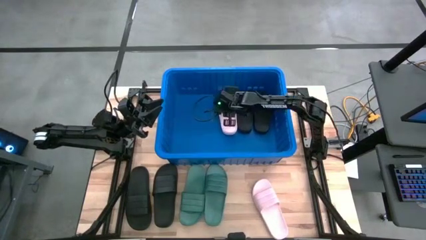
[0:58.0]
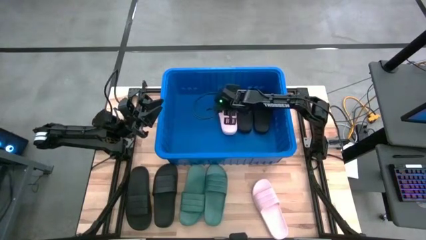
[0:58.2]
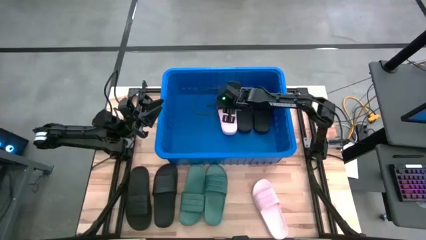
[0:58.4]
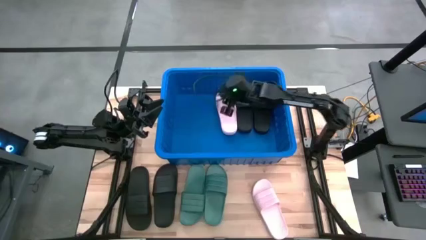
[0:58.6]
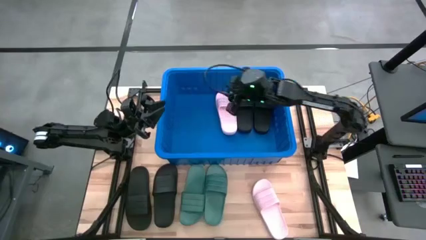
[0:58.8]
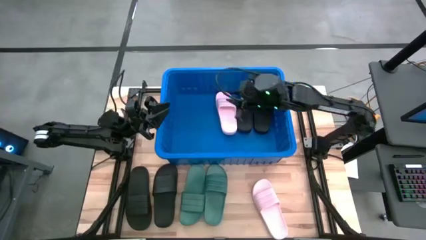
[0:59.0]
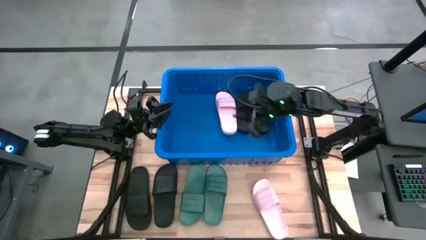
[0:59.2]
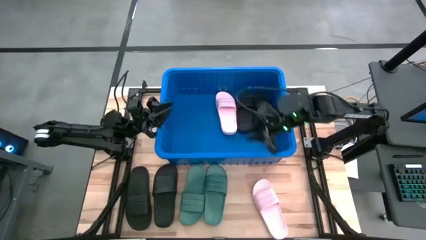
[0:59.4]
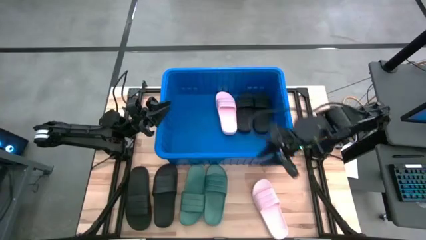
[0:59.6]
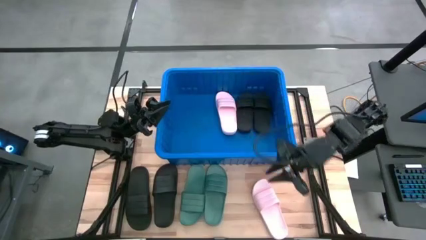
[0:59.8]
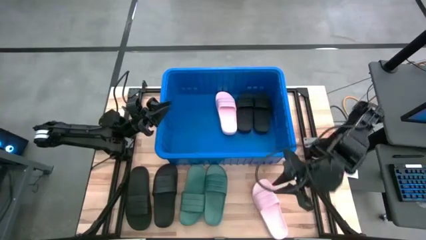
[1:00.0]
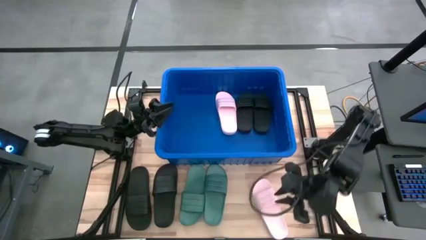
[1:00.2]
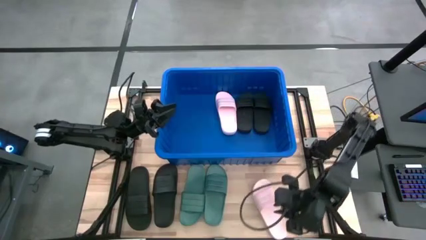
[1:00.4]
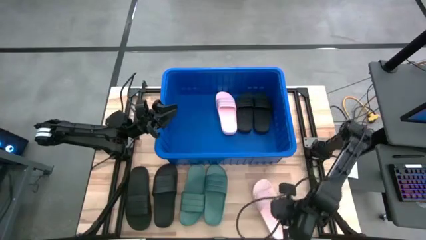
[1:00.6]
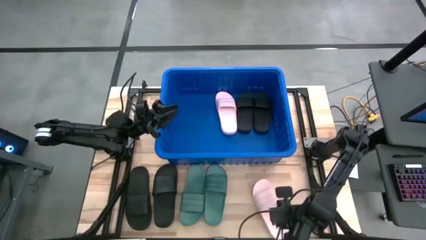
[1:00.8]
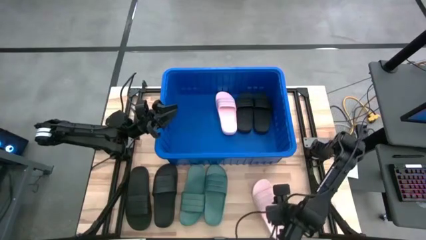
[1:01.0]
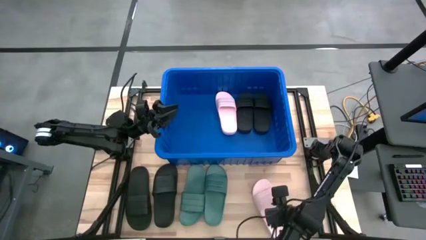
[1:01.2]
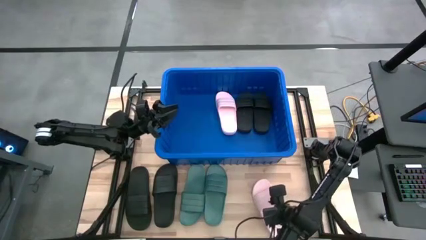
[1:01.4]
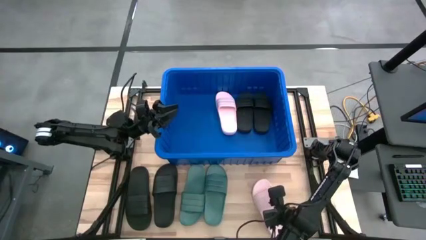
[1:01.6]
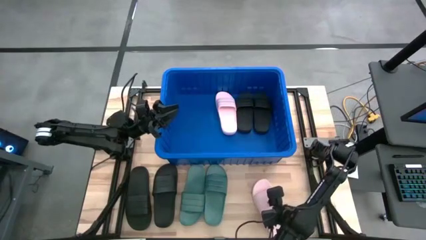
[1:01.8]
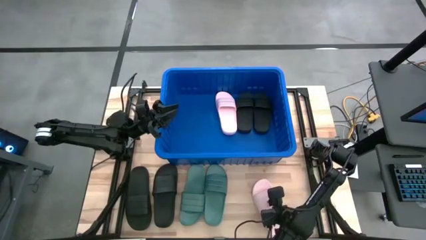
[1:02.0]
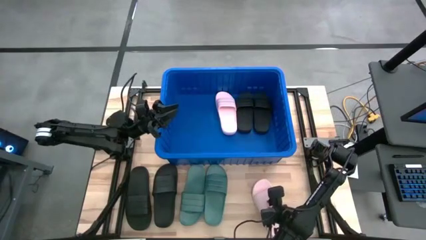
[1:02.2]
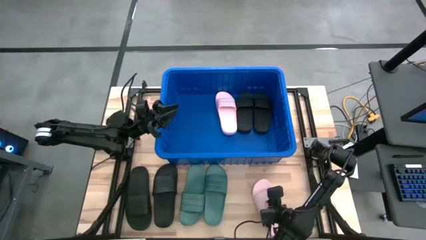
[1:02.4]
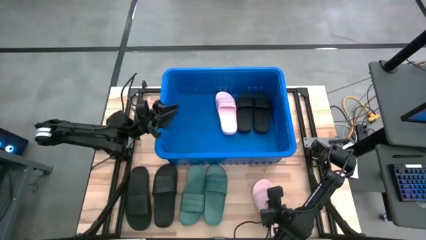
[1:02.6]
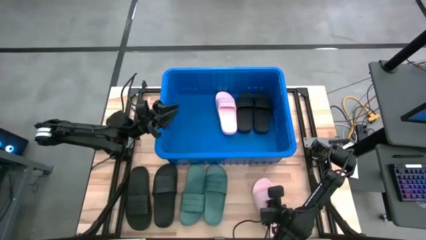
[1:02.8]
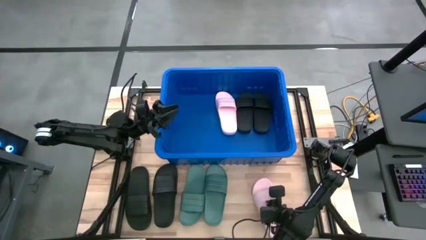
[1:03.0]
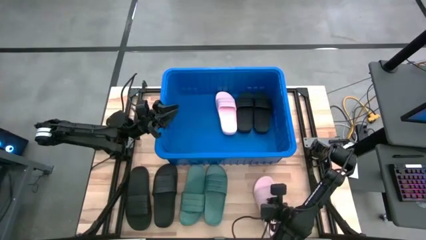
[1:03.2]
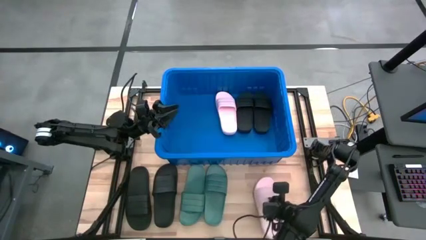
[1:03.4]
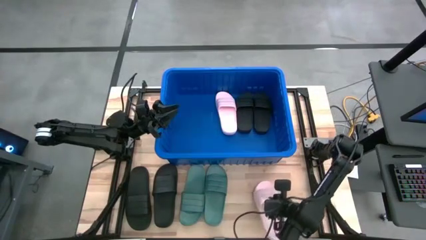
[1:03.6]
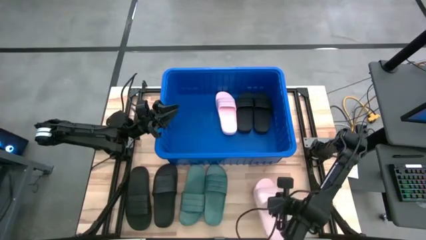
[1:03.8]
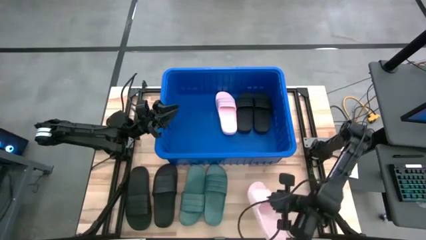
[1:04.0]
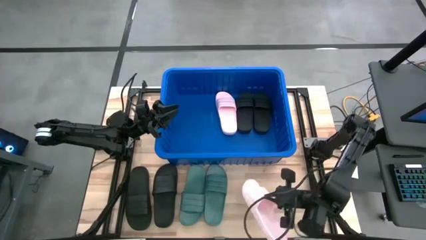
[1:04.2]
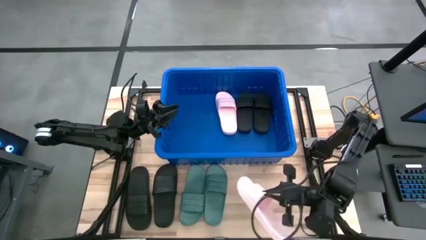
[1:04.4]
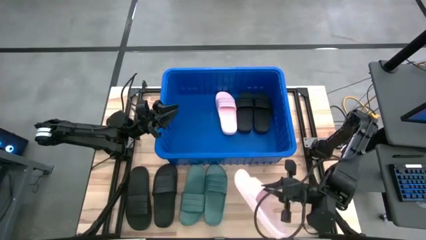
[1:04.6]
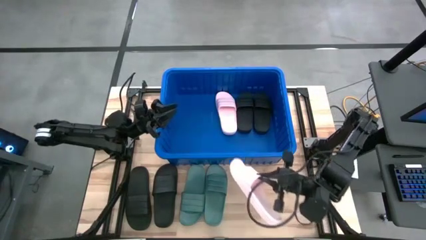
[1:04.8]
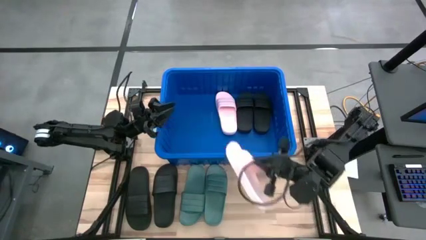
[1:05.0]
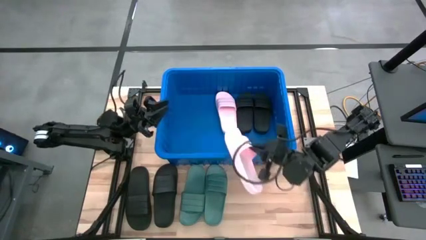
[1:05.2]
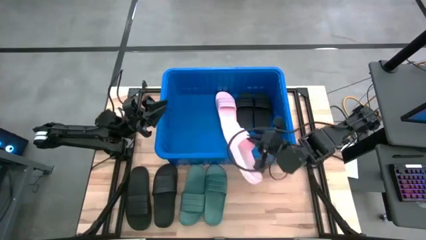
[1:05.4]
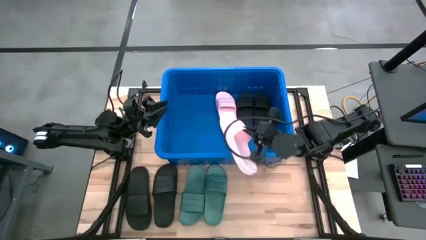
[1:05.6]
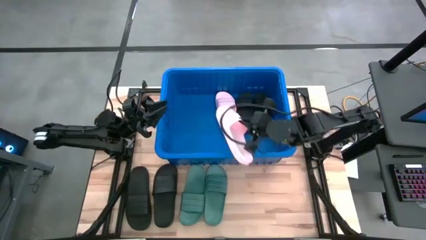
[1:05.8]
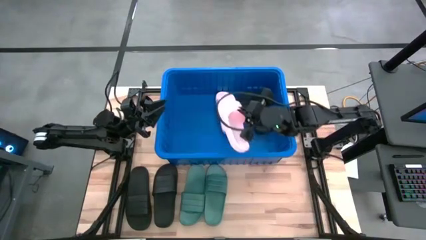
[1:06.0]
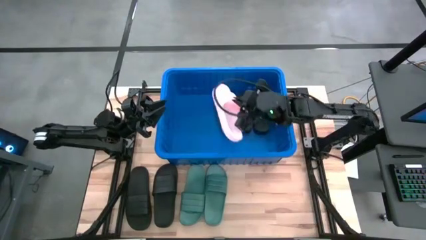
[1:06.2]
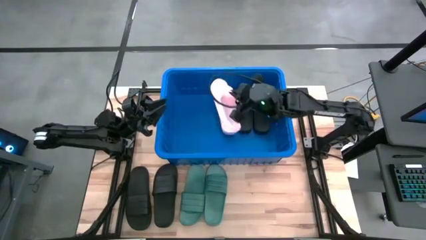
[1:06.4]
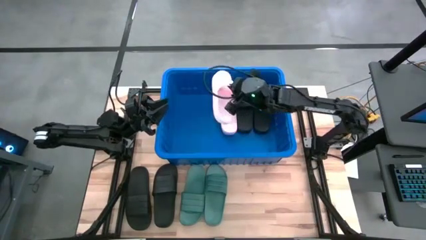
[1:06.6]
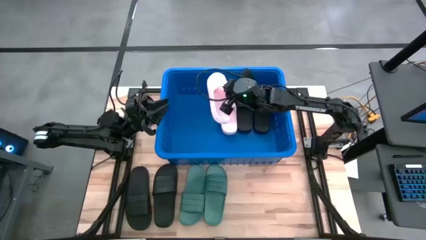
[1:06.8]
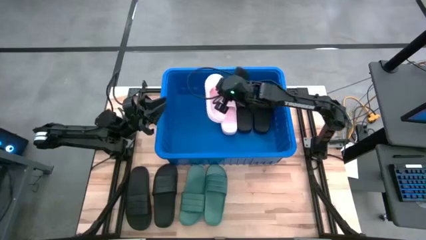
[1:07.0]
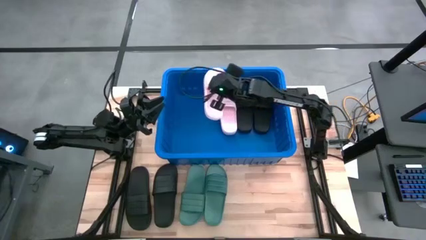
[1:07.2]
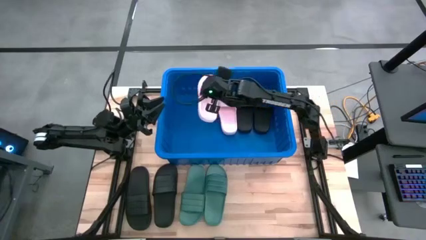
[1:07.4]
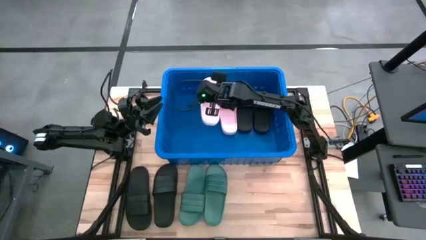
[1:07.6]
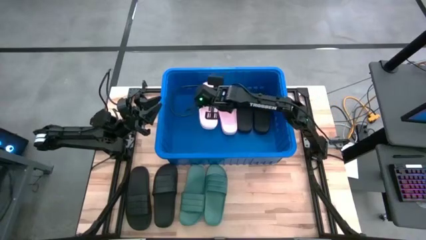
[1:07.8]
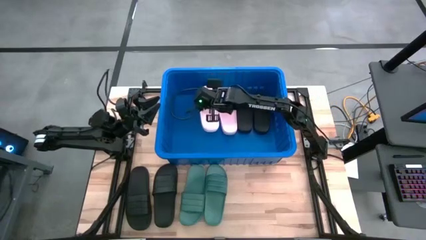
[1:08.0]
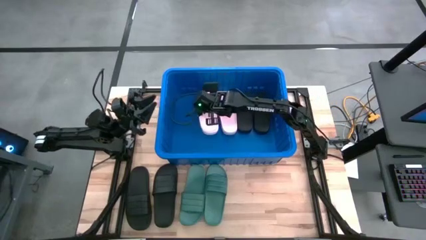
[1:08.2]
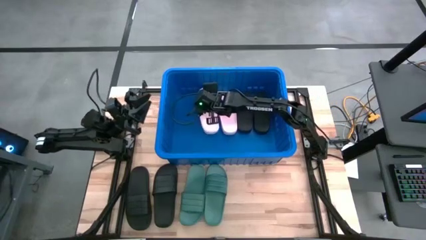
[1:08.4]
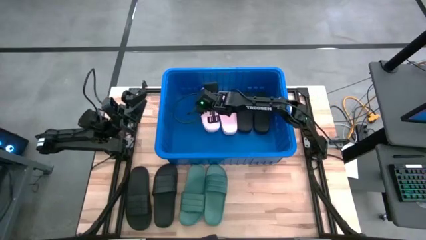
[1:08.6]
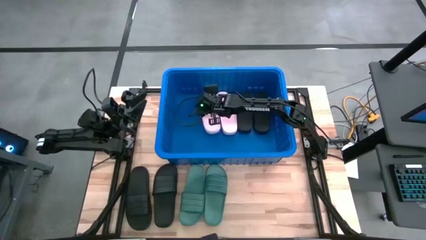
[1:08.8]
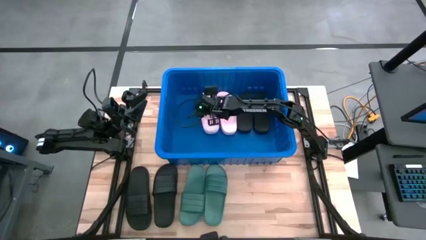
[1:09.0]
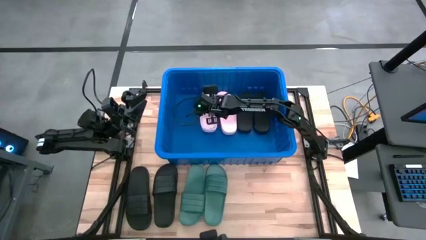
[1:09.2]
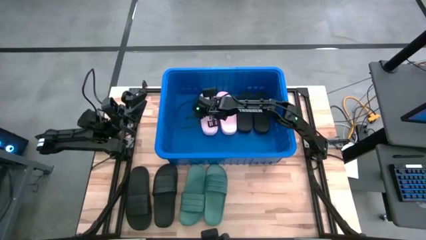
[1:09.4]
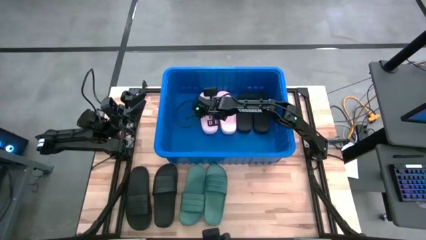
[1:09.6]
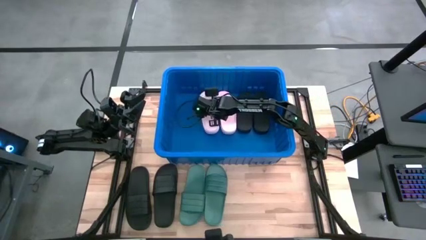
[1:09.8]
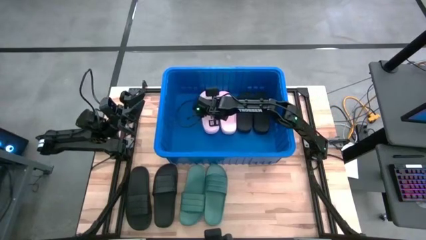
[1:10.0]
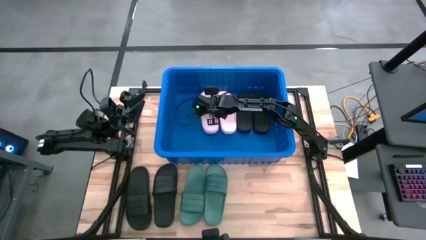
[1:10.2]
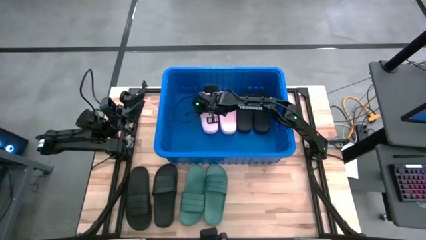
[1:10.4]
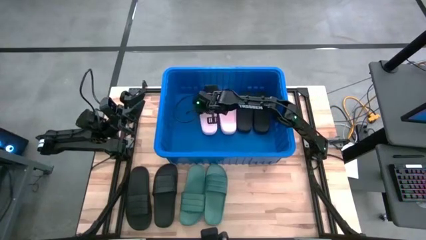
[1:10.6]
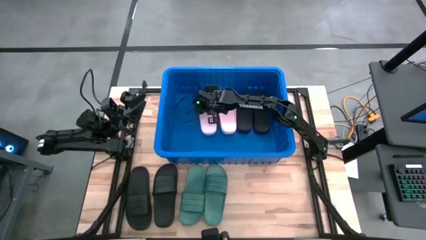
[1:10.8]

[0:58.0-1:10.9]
Task: Pick and place slides into bin
Put the pink slipper into the blue bin

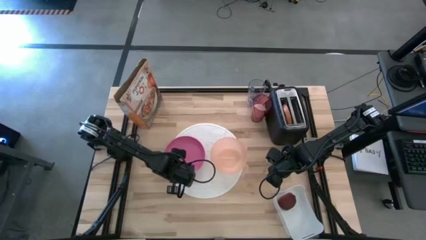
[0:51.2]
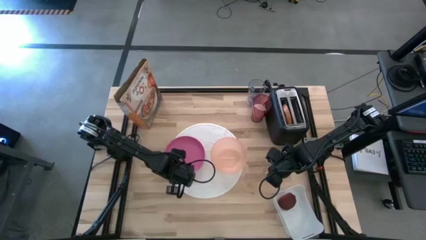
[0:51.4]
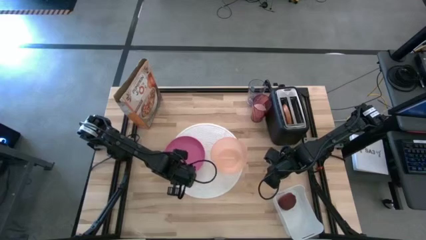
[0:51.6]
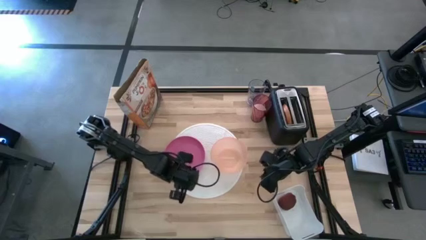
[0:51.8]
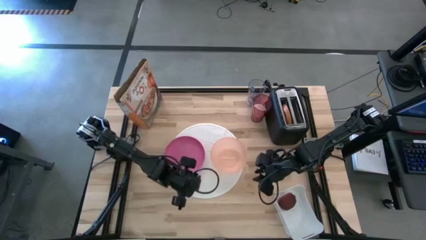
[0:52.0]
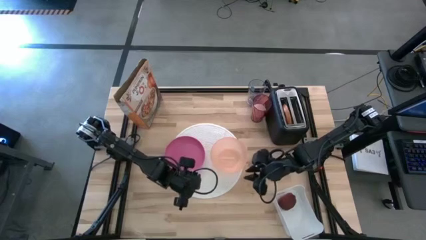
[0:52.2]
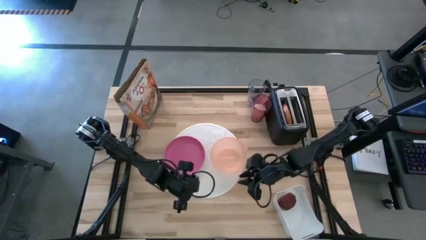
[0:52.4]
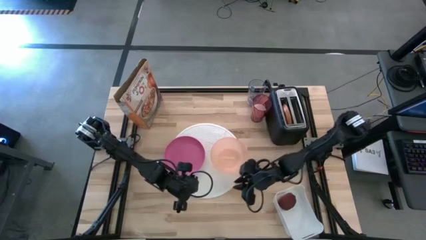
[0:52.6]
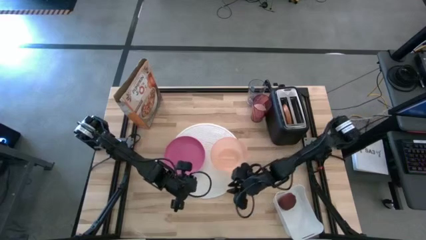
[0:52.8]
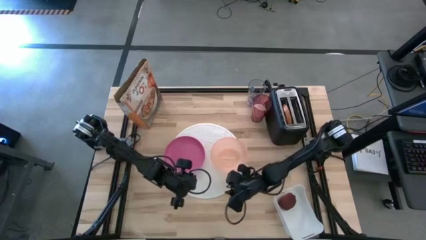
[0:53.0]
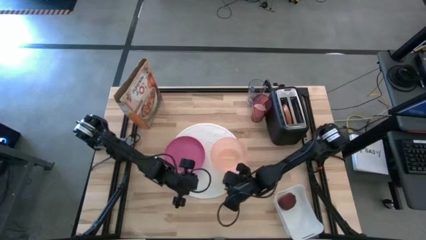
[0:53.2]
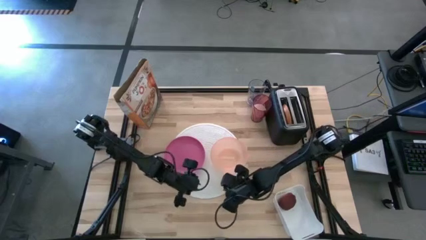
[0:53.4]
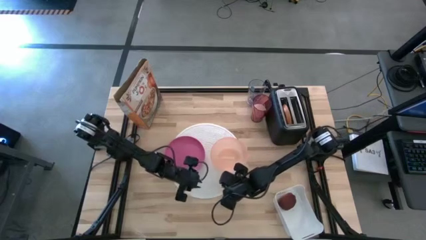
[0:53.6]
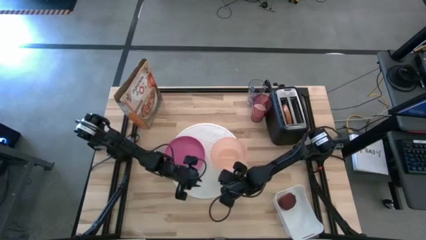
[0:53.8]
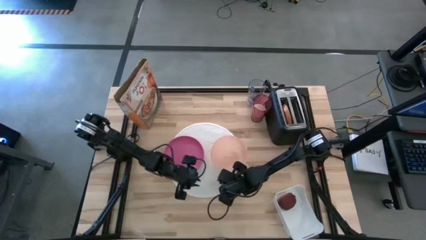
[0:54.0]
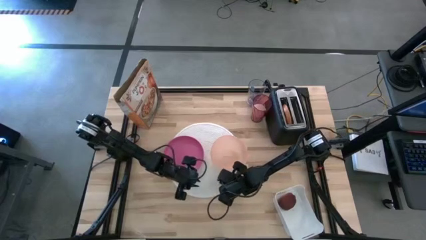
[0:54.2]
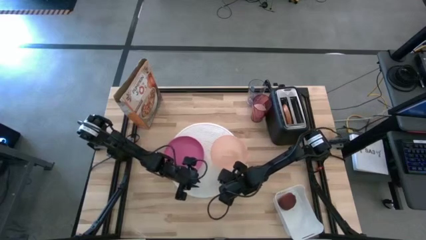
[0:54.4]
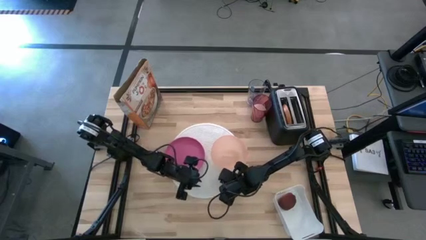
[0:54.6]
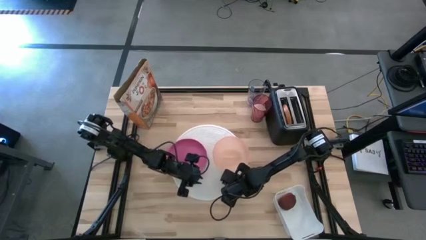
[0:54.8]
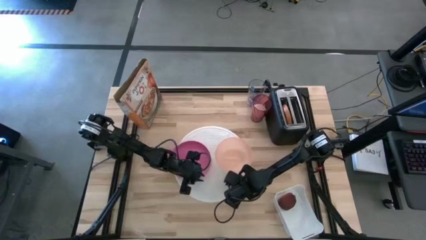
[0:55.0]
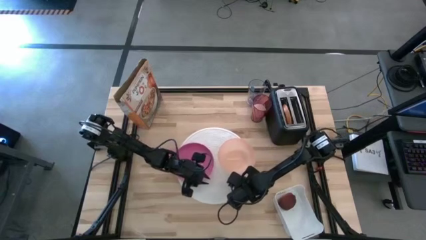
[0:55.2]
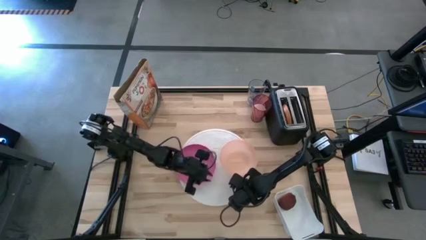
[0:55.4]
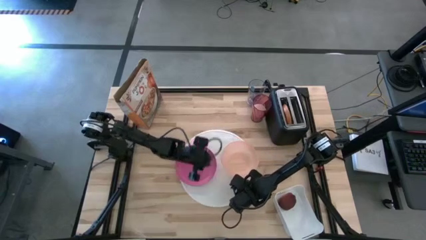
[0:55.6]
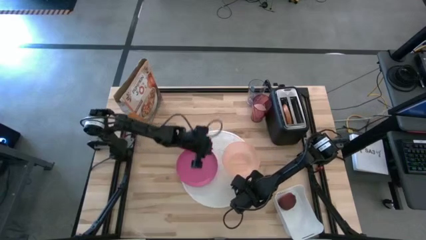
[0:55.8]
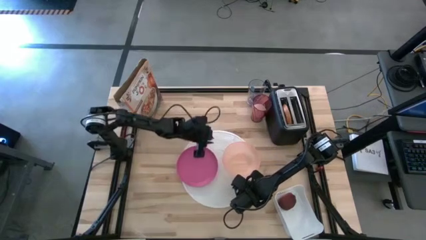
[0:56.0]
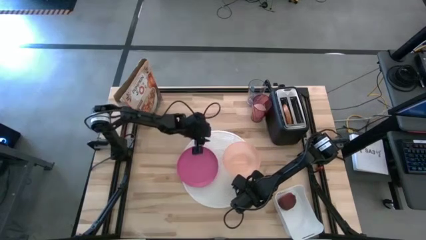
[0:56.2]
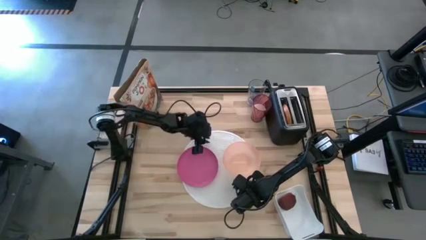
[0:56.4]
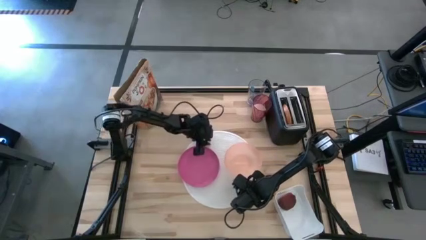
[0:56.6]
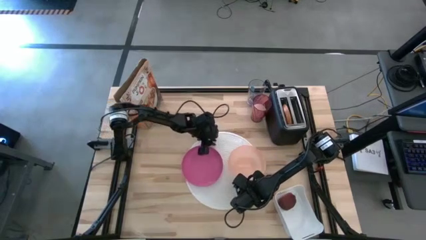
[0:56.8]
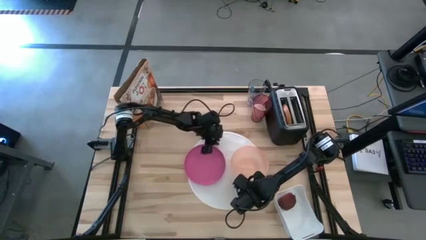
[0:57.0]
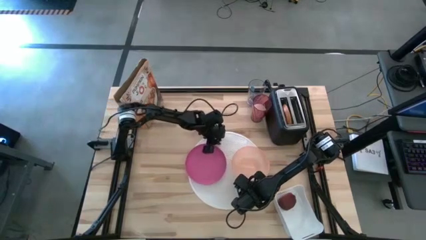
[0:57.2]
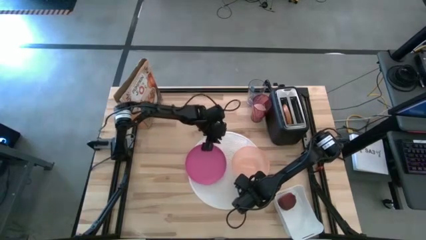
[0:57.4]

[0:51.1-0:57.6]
Task: Arrange a breakfast setting
Adjust the white placemat
